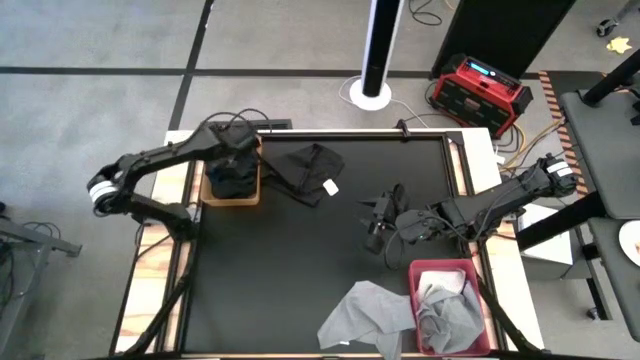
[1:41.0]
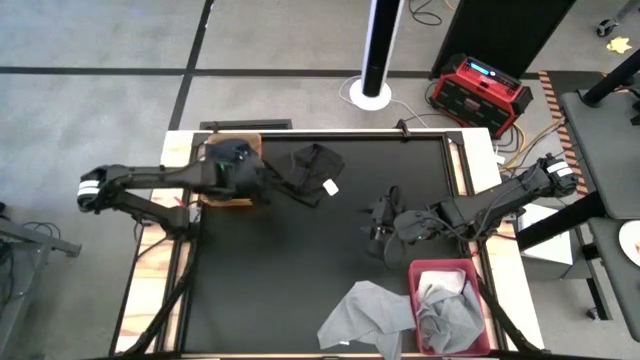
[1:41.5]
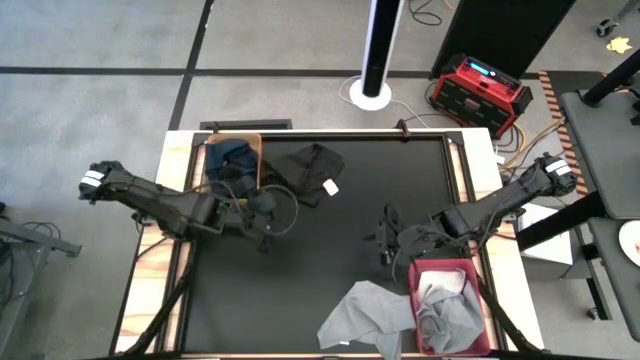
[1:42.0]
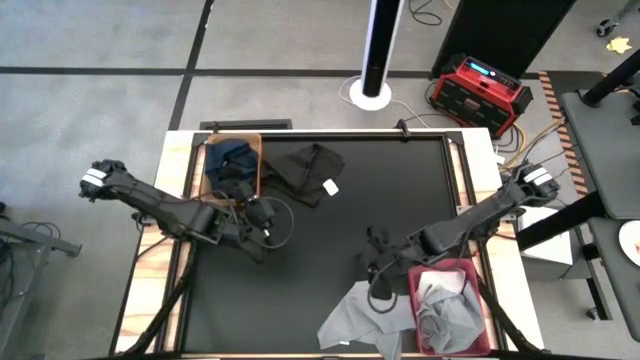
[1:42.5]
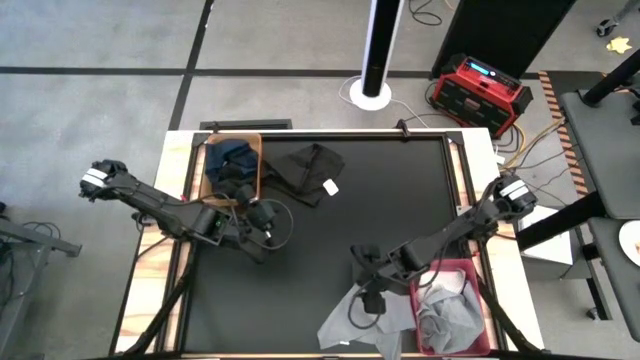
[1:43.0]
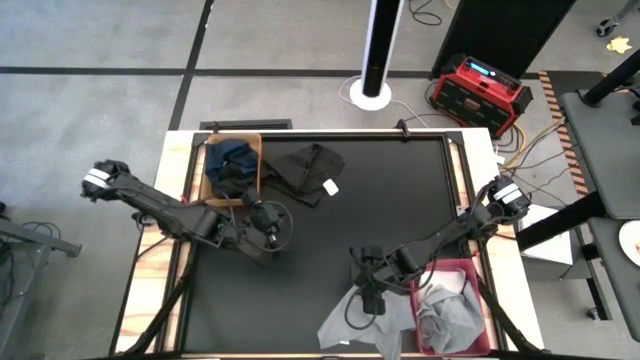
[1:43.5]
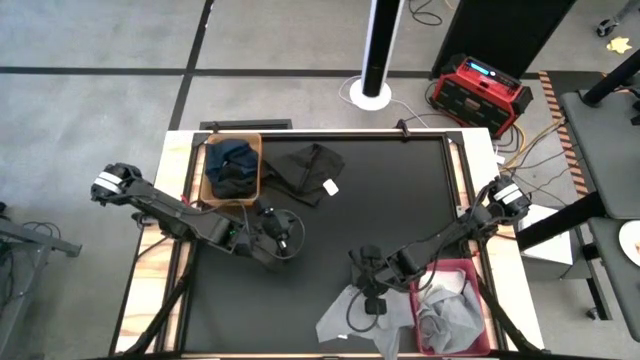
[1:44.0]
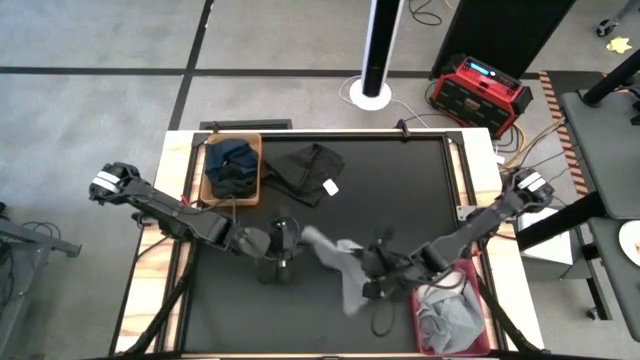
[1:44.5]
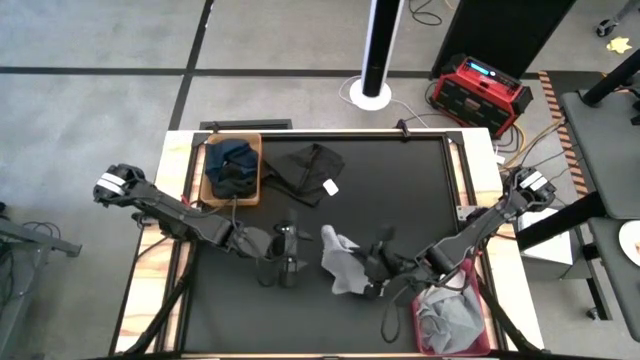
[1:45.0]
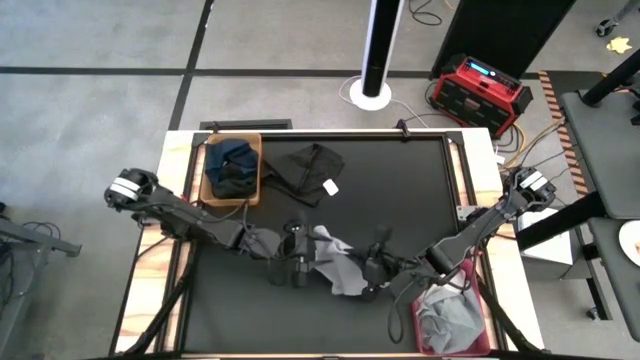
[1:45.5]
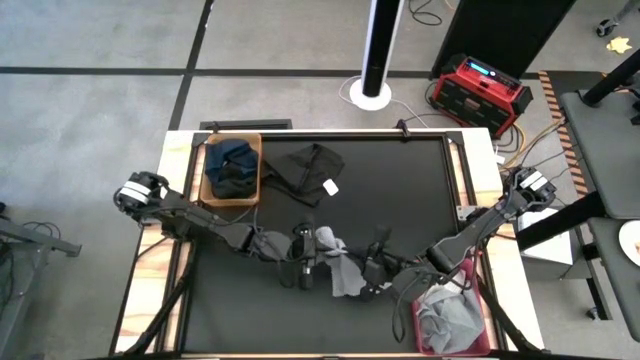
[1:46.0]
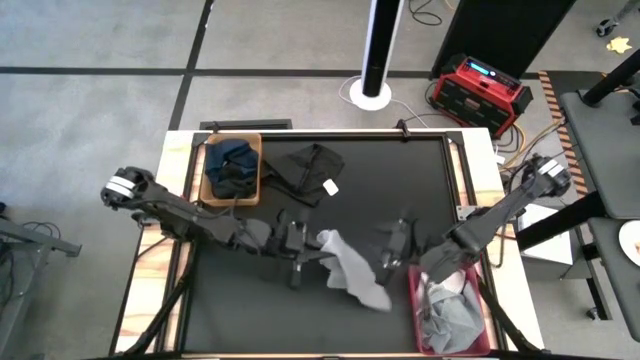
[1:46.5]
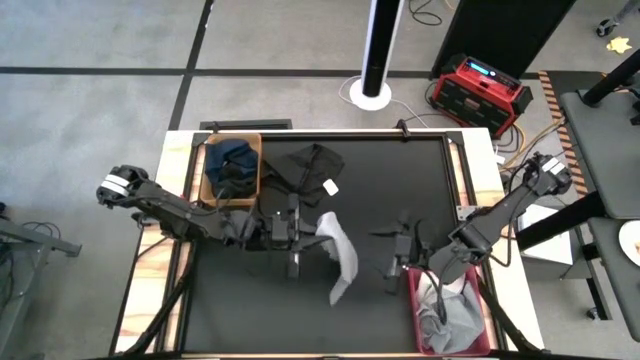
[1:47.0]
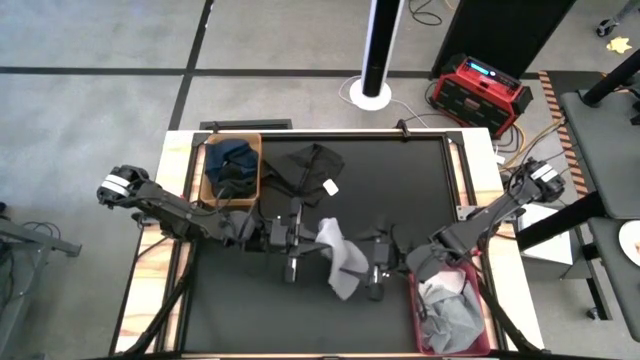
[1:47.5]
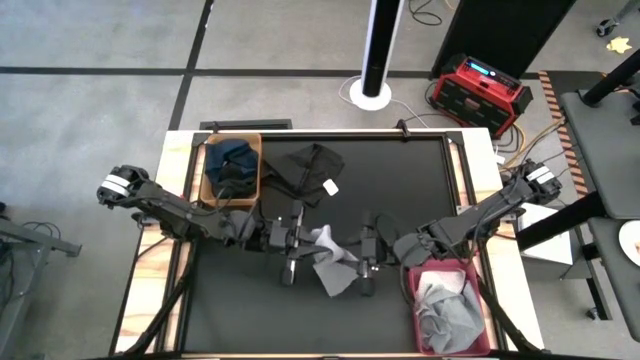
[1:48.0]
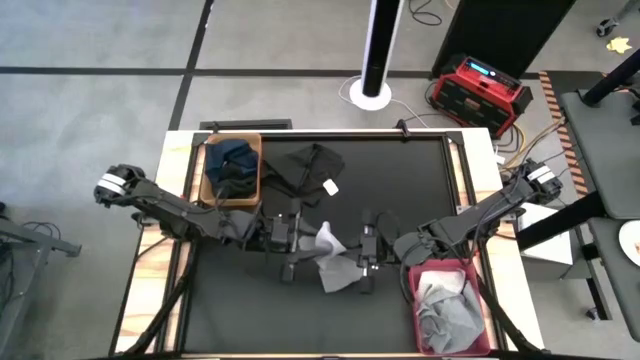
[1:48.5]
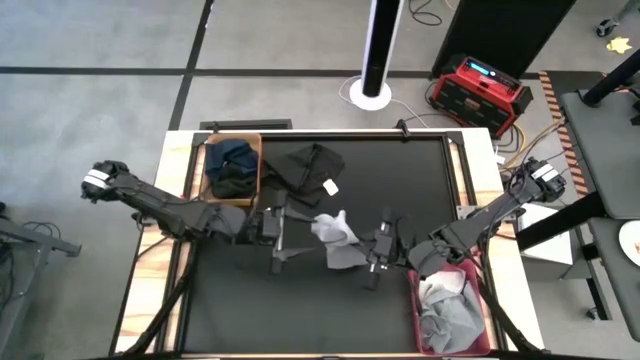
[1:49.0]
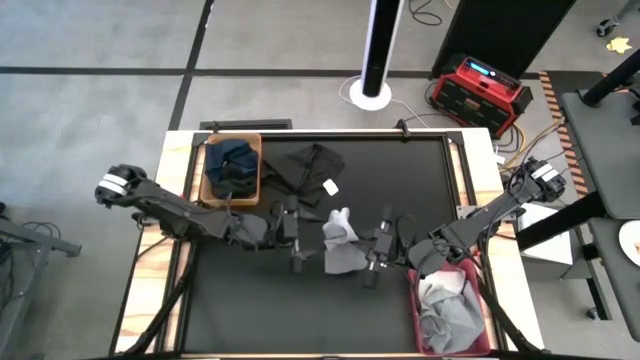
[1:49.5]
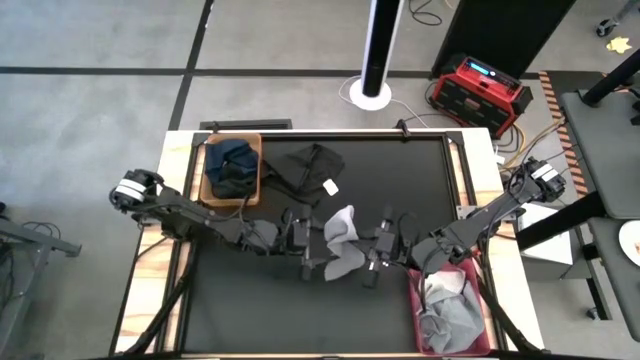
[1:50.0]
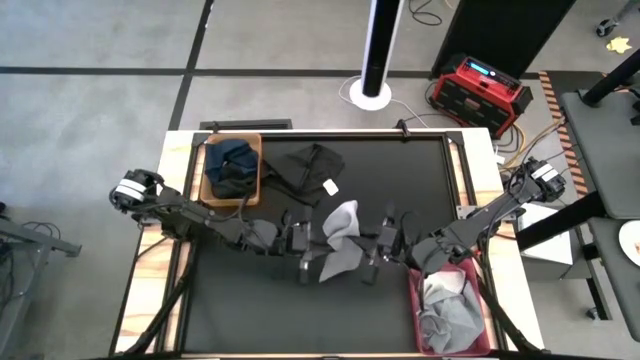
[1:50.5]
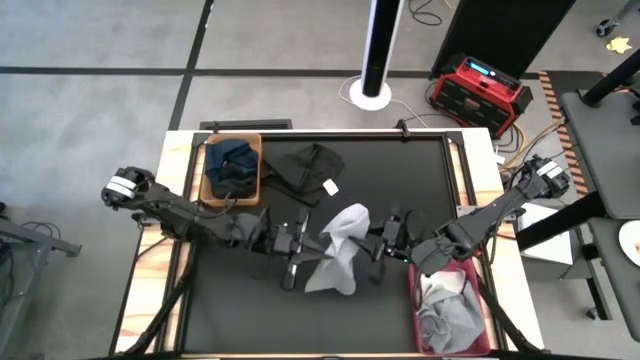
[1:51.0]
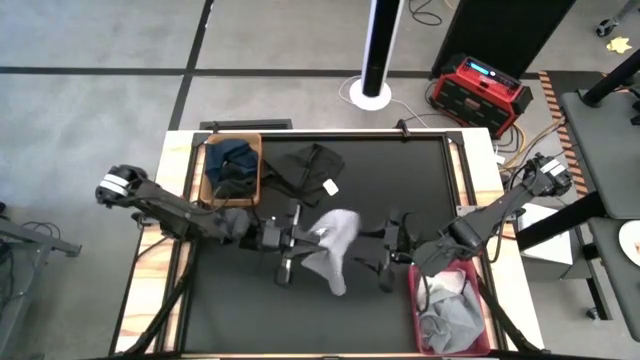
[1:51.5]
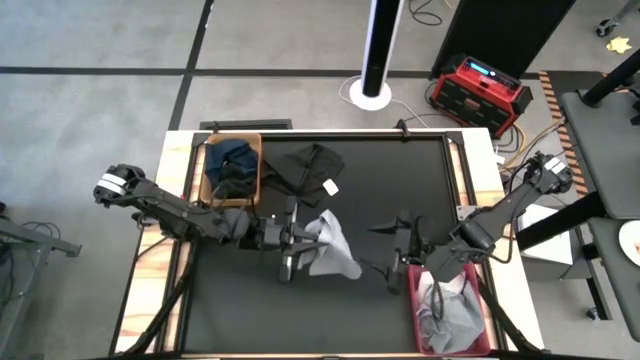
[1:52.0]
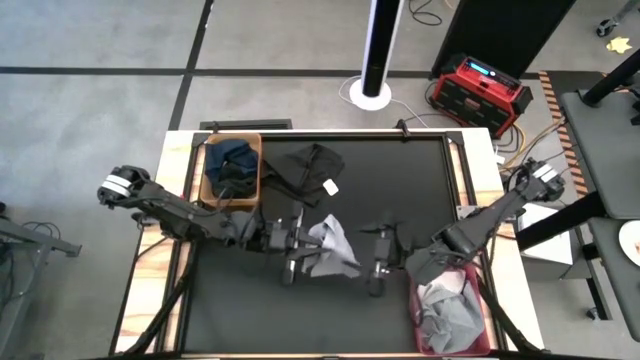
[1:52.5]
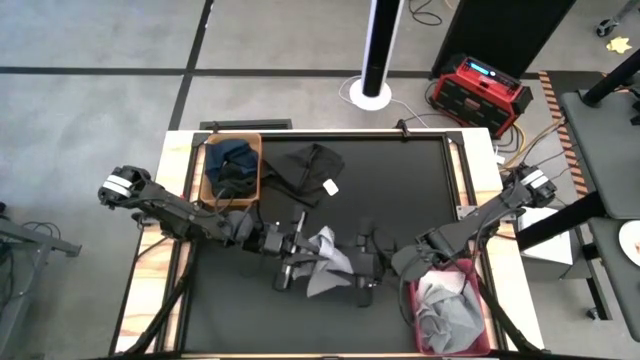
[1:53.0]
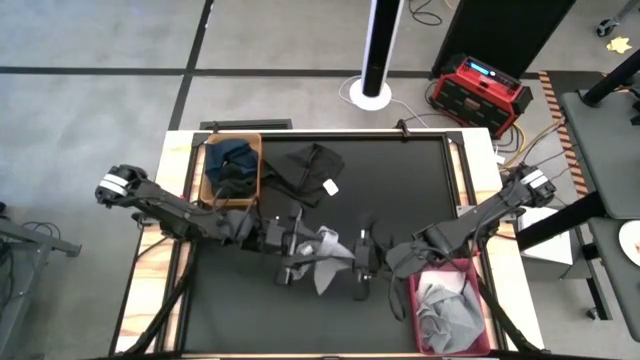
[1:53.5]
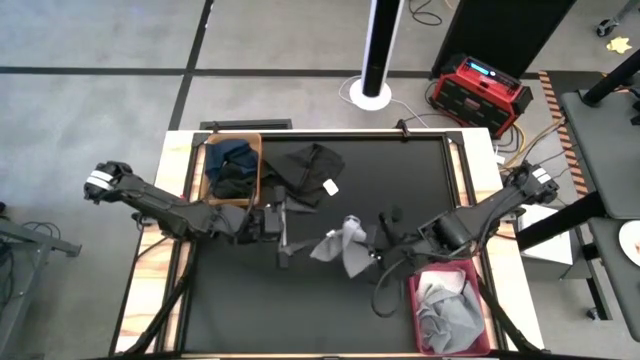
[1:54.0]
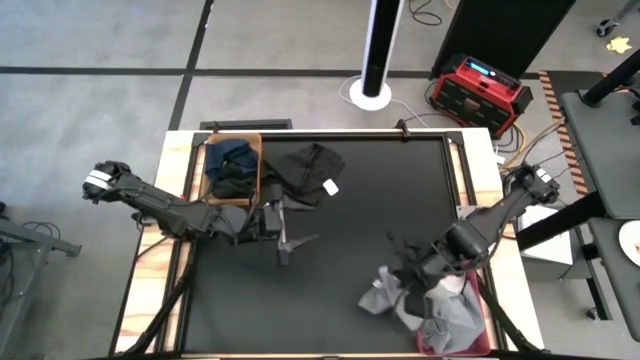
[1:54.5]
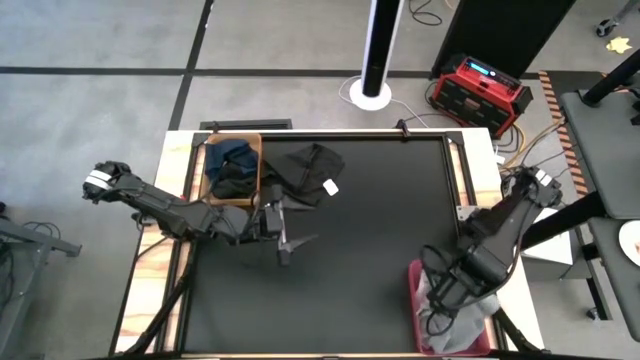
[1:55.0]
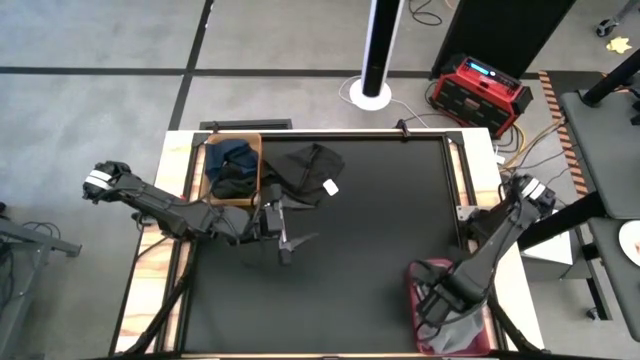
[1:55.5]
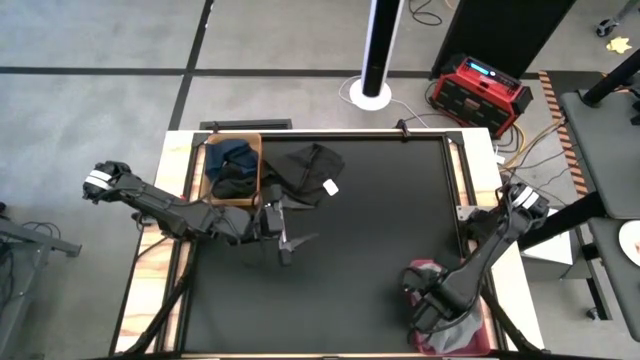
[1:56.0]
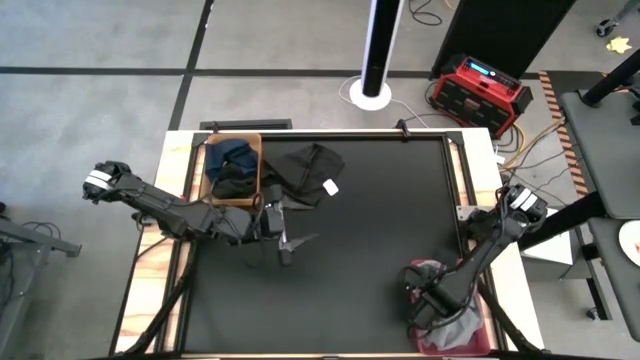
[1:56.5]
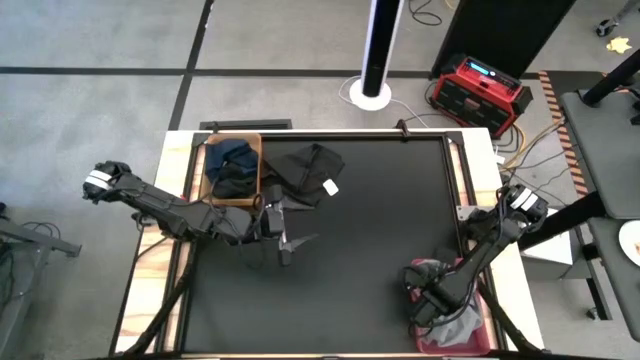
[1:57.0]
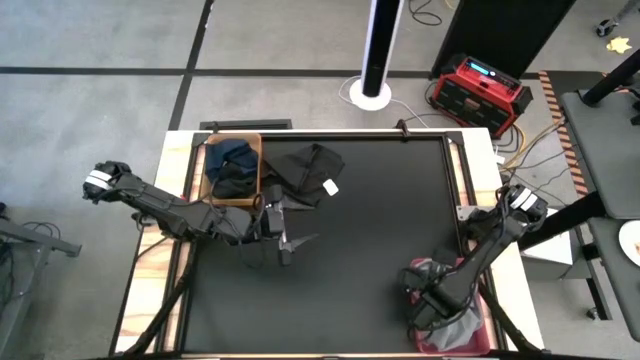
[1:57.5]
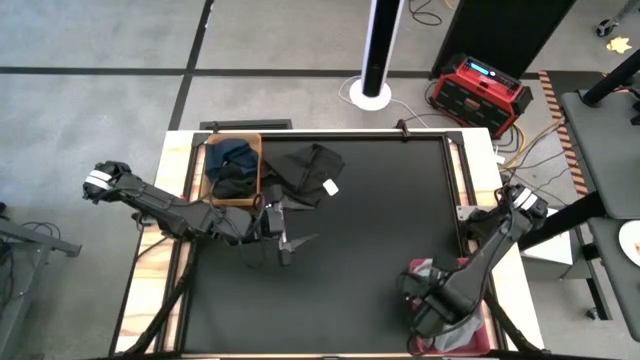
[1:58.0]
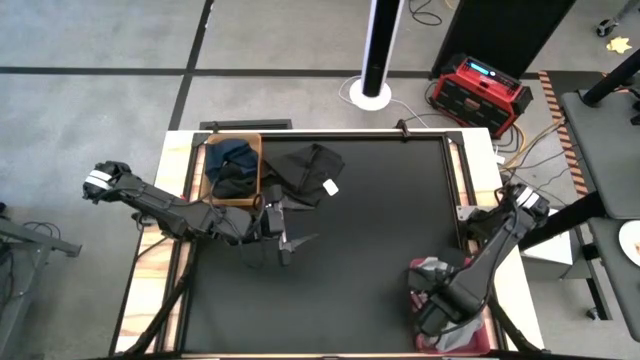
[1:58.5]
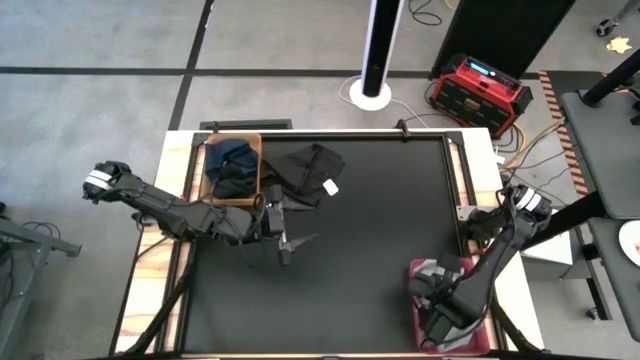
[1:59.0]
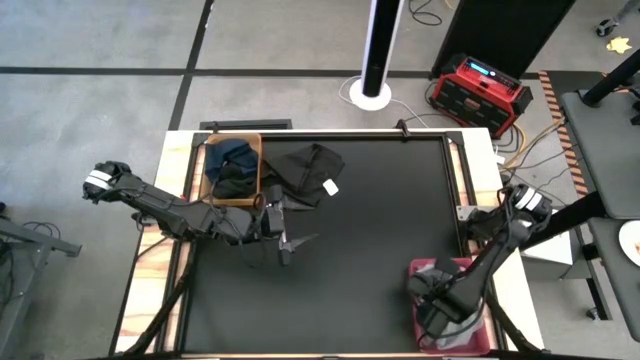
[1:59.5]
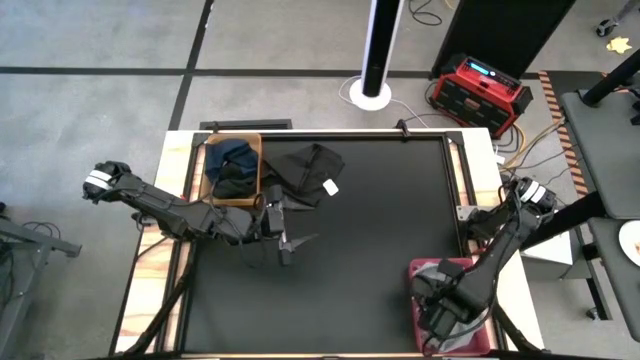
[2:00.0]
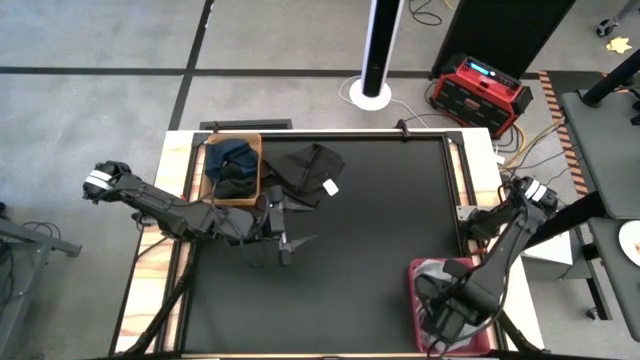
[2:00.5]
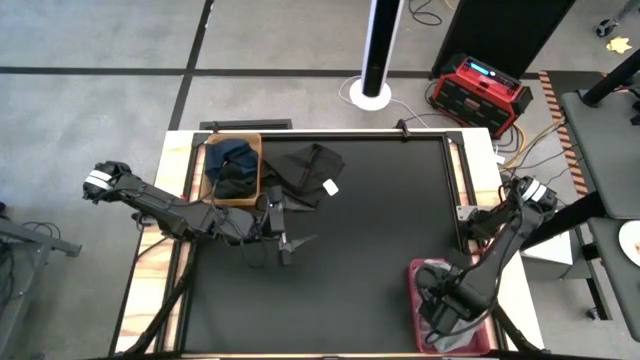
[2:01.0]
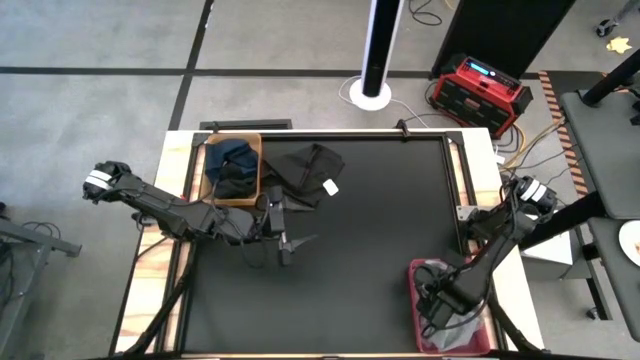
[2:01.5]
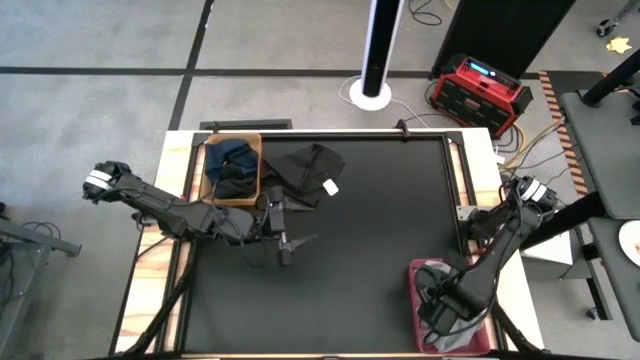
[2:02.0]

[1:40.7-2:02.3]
Task: Sort towels by color in basket
Put the gray towel into the pink bin
